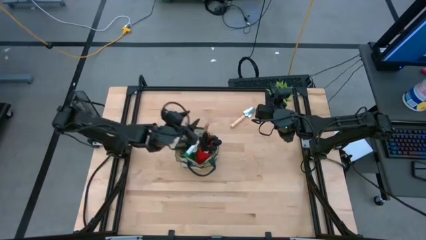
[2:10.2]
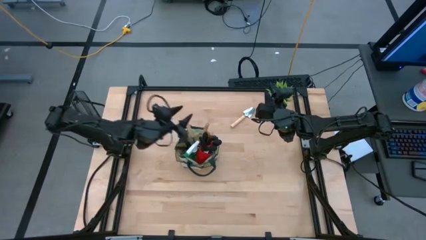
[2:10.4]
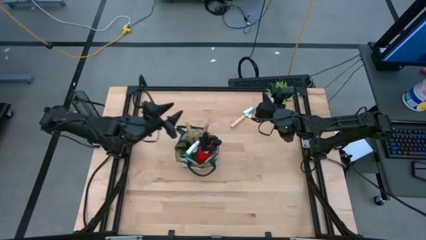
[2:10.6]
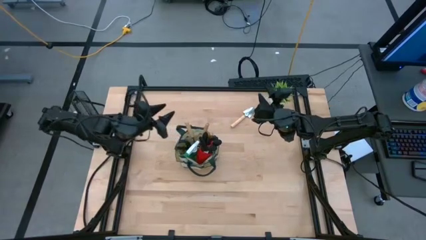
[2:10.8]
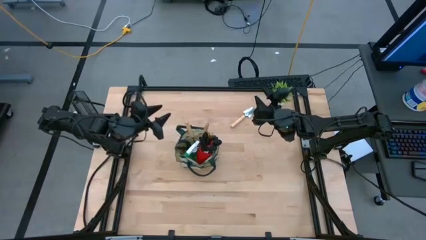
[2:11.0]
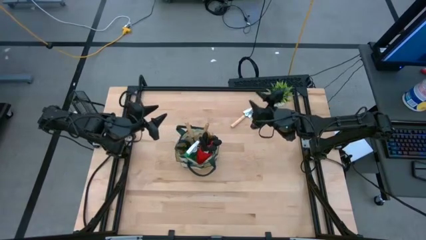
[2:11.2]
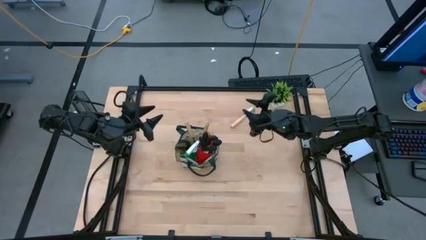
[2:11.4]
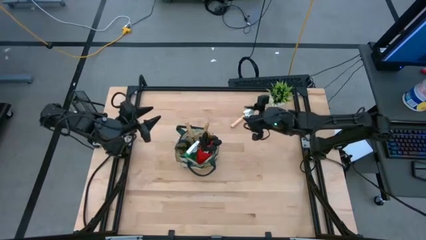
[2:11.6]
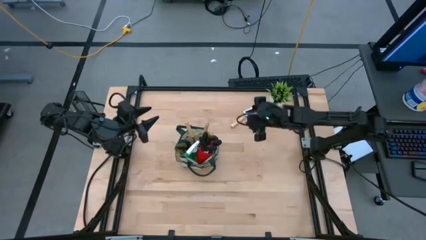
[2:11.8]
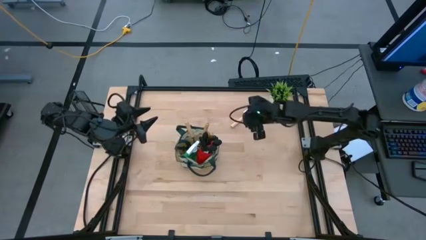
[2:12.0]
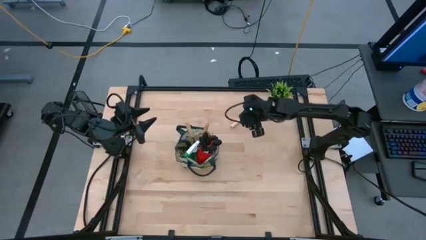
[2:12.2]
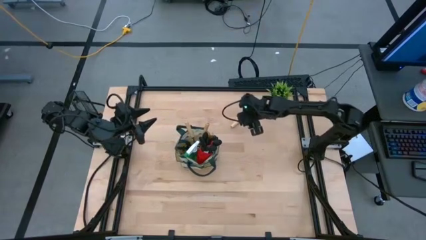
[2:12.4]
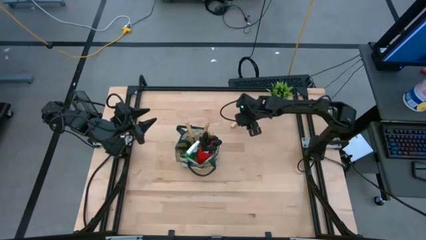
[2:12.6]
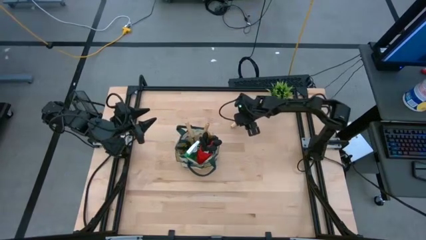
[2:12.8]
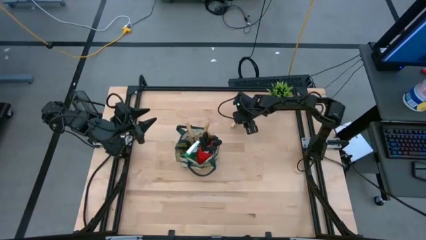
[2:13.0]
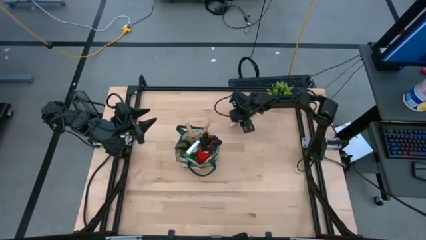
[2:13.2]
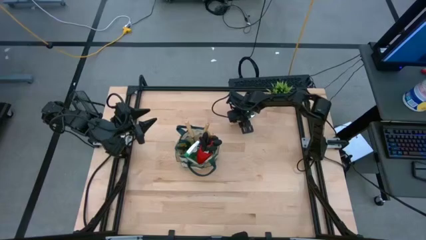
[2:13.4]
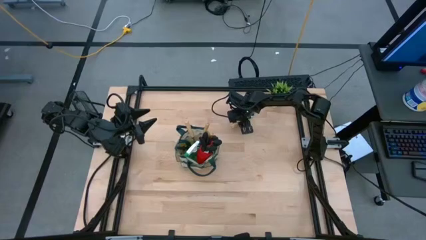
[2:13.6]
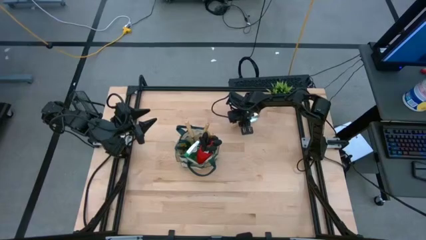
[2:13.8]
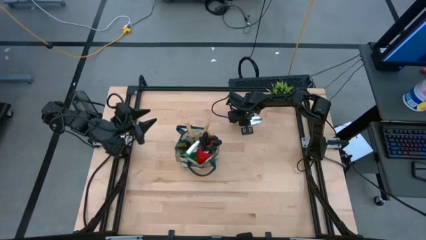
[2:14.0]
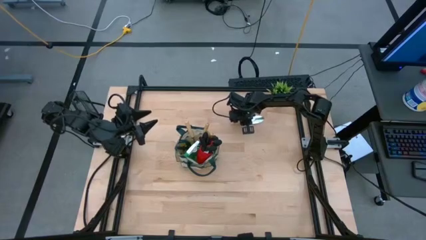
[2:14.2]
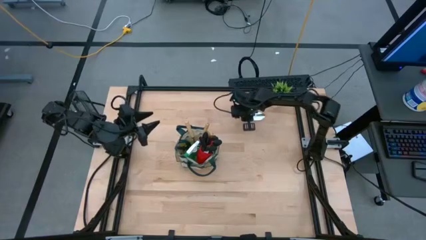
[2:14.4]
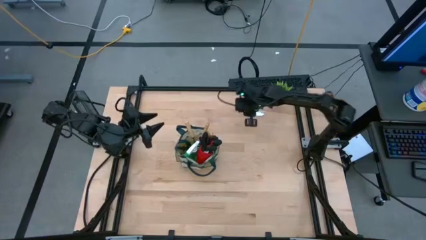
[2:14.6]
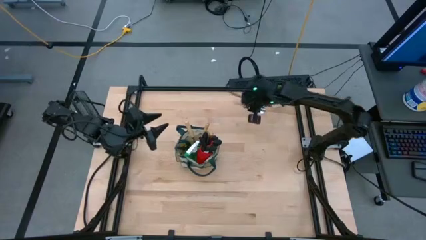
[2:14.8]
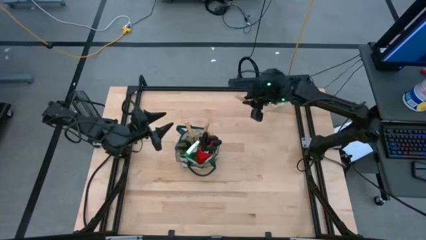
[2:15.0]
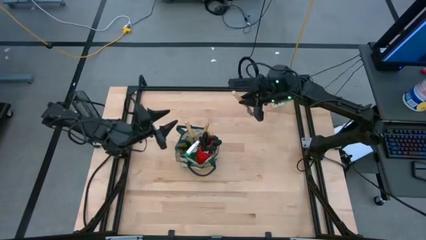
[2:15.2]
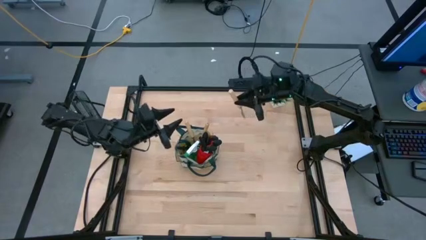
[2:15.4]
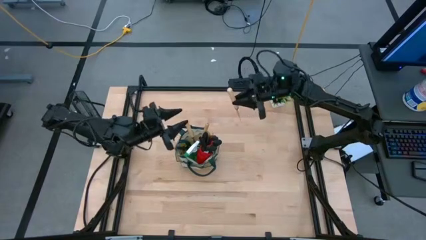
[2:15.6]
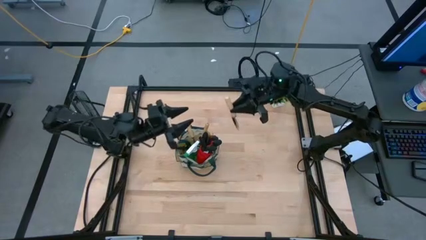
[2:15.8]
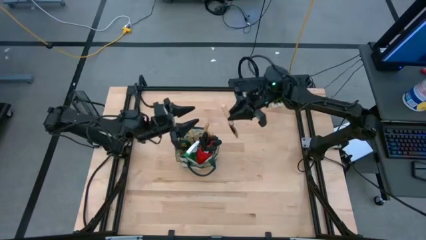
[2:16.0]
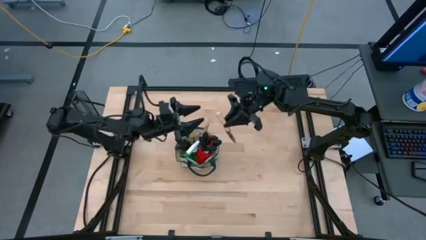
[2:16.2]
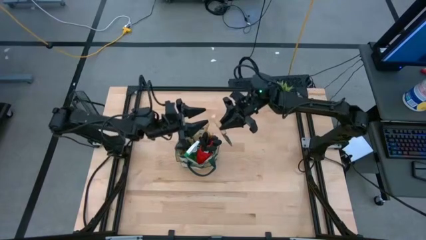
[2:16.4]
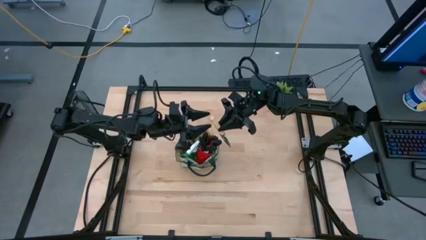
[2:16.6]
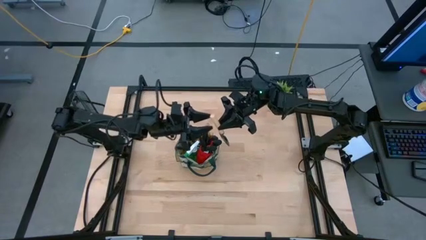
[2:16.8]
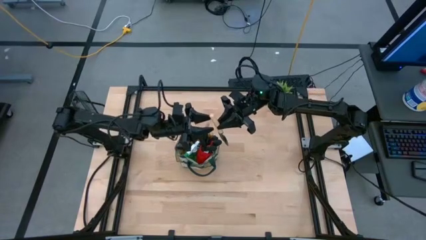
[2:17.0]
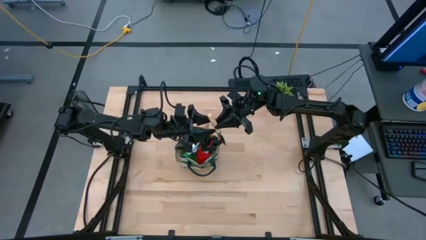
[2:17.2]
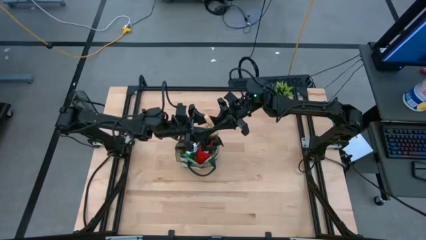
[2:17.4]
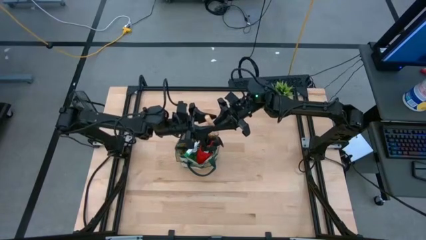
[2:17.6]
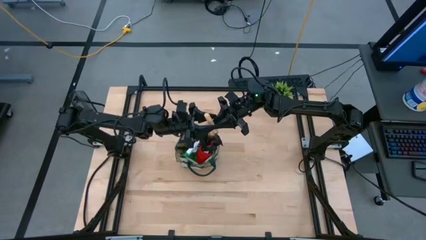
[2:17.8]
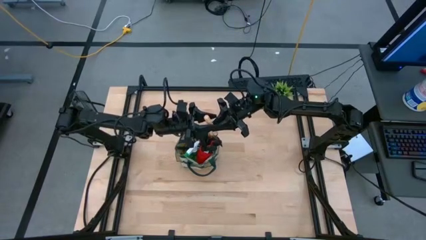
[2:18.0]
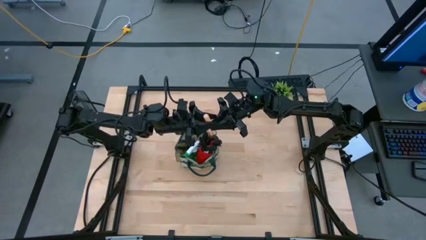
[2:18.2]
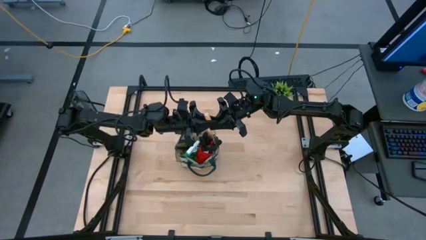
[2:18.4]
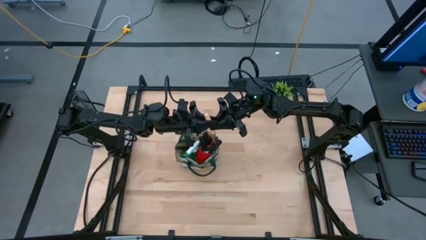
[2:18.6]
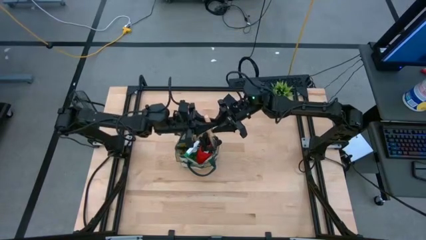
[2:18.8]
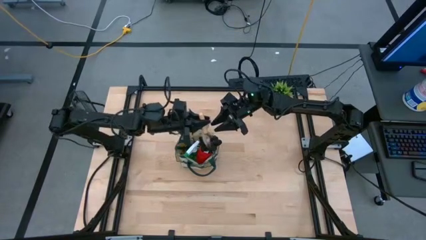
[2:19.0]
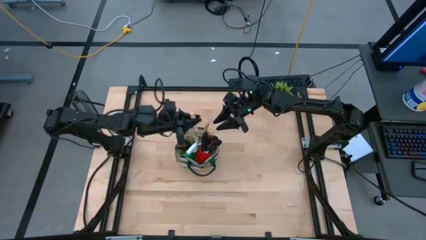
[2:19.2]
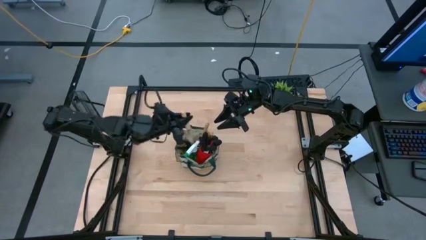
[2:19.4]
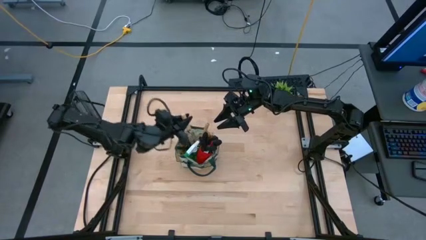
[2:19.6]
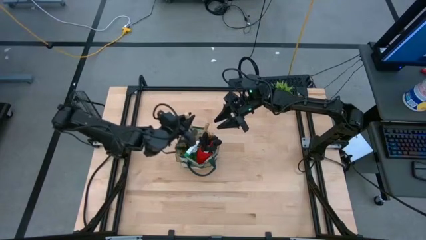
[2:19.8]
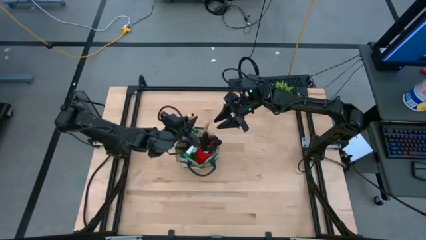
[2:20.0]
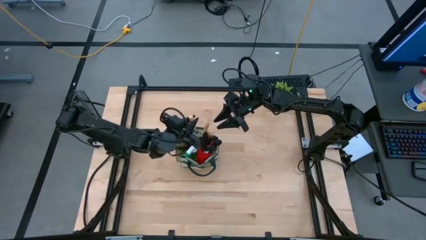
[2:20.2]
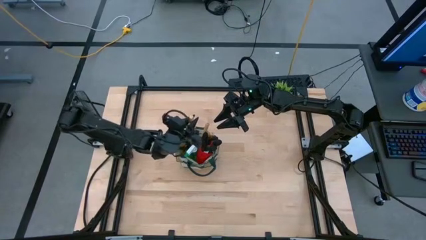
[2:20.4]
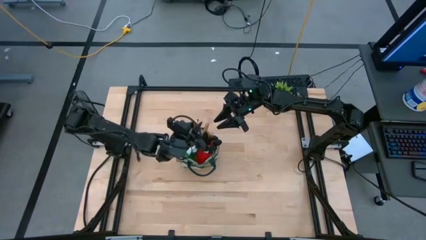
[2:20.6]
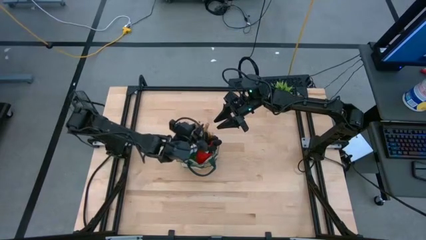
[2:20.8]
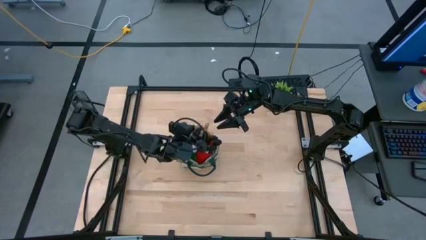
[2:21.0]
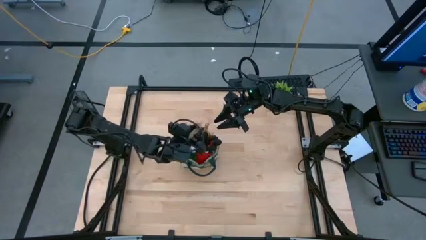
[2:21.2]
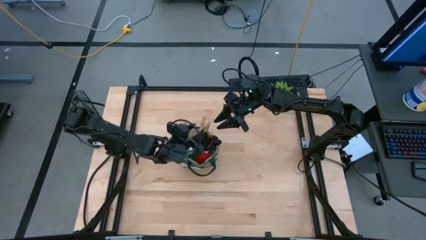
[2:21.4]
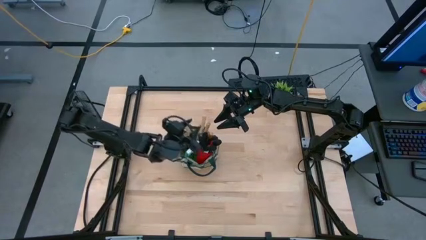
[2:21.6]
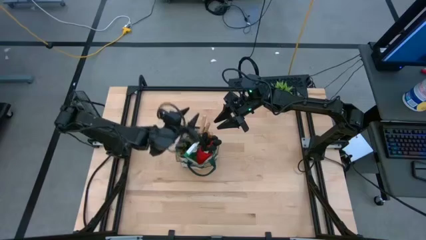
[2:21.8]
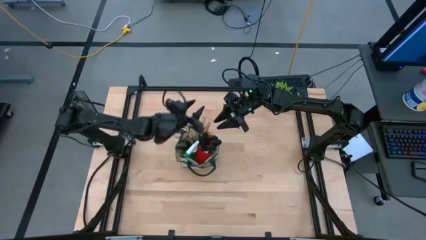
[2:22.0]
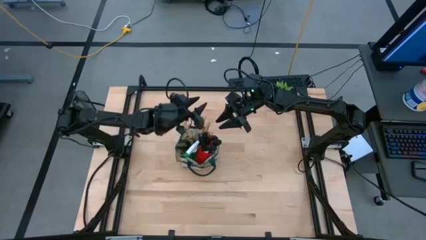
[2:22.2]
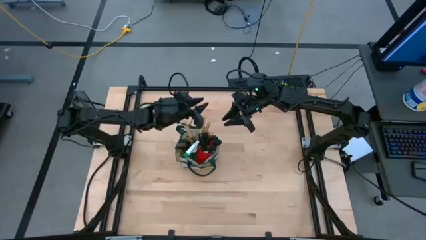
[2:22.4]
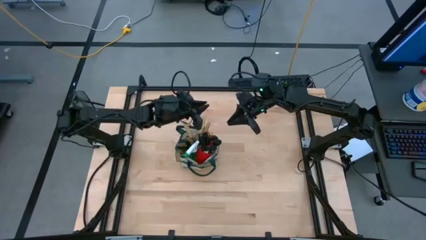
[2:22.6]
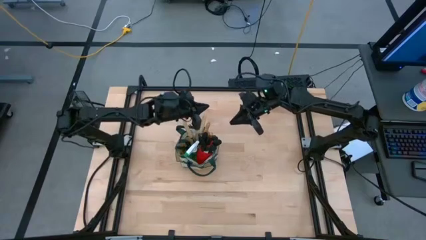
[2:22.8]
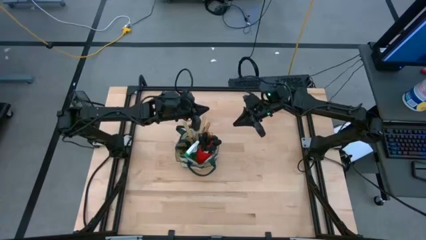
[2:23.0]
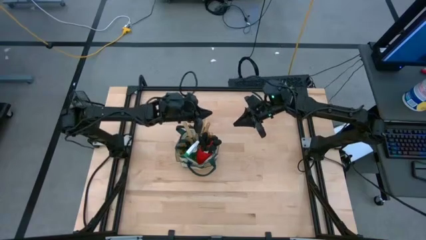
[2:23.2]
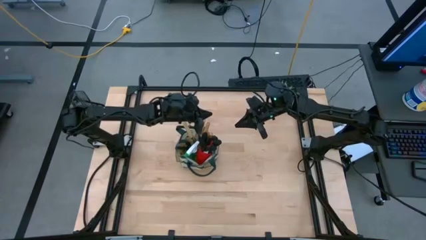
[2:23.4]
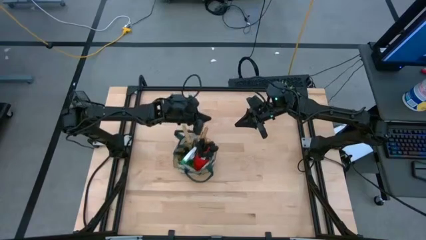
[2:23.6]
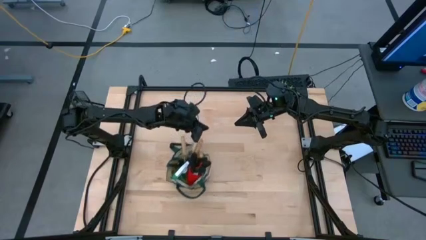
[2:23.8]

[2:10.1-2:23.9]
Task: Pick & Place Garden tools in Gardening bag
Put the brown trowel into the brown gardening bag
